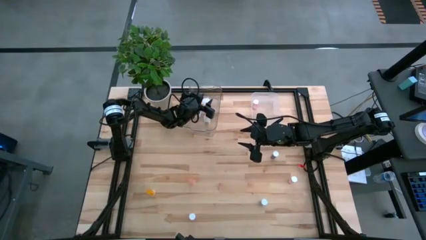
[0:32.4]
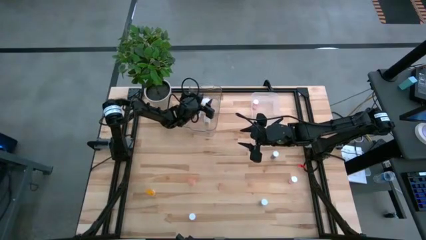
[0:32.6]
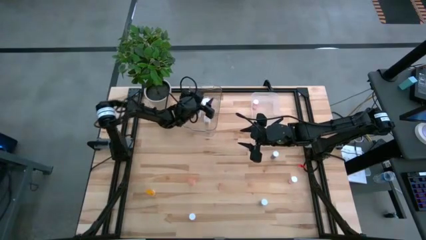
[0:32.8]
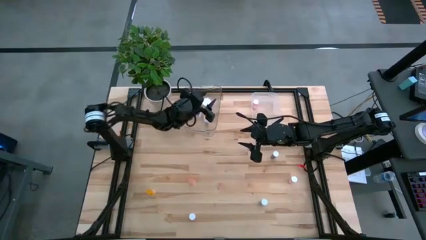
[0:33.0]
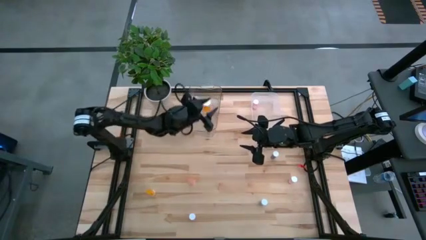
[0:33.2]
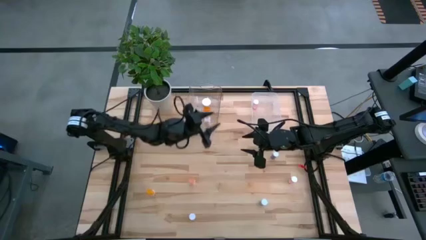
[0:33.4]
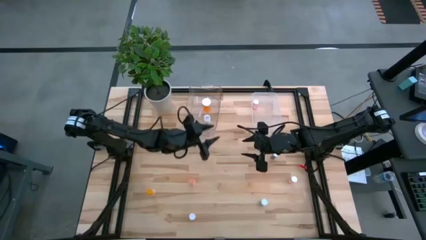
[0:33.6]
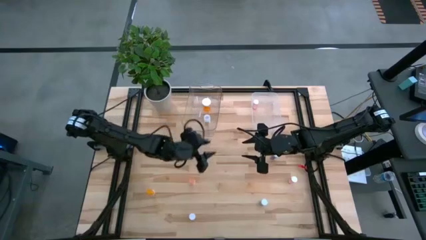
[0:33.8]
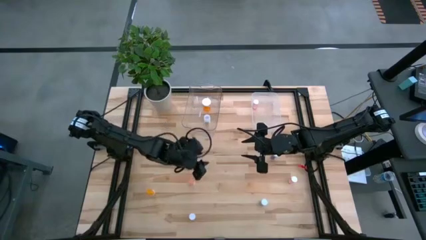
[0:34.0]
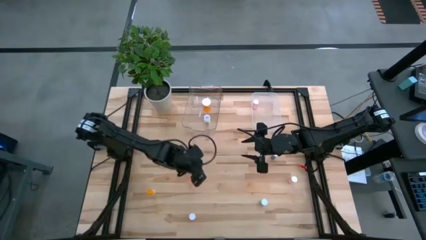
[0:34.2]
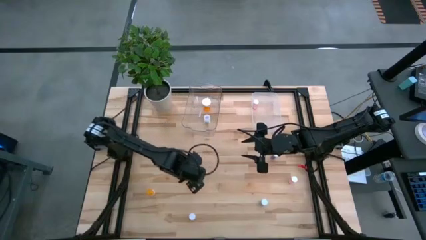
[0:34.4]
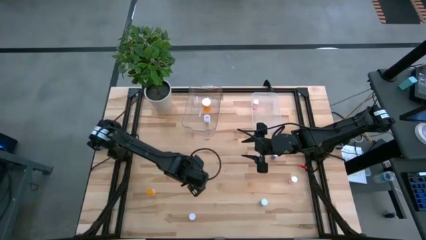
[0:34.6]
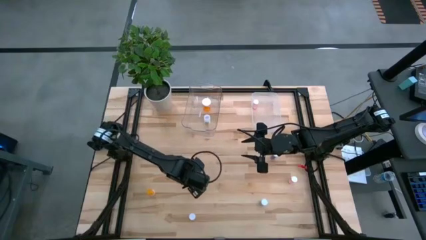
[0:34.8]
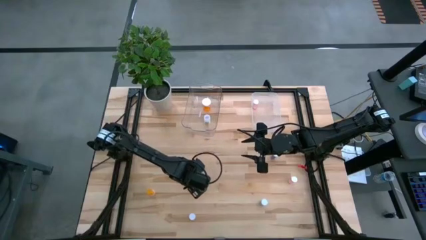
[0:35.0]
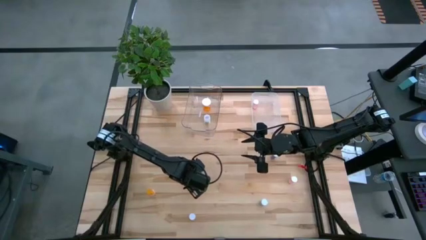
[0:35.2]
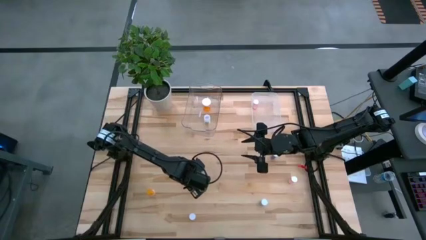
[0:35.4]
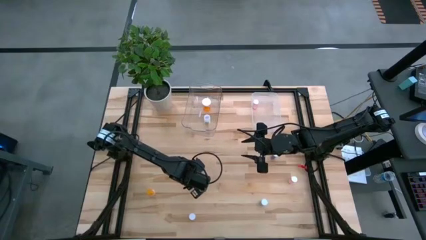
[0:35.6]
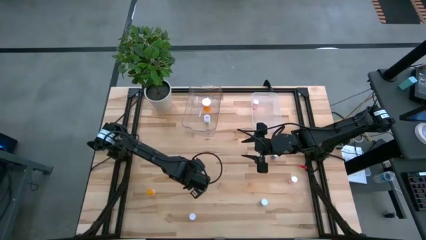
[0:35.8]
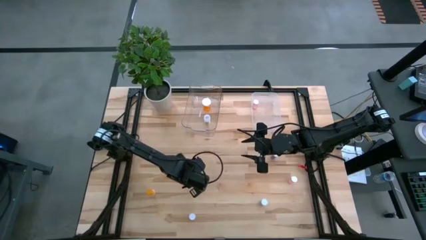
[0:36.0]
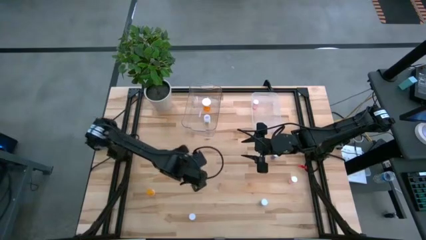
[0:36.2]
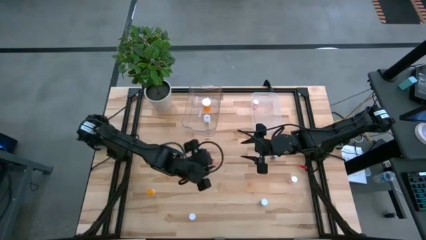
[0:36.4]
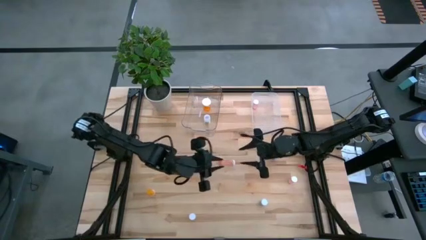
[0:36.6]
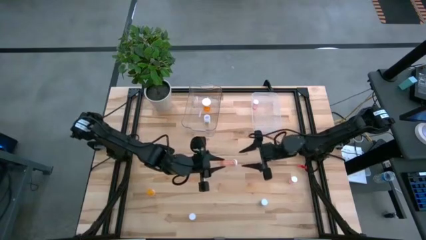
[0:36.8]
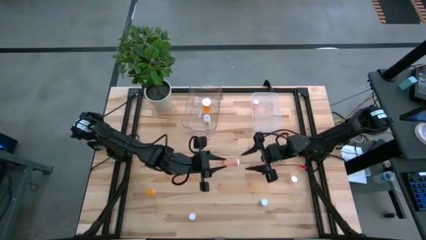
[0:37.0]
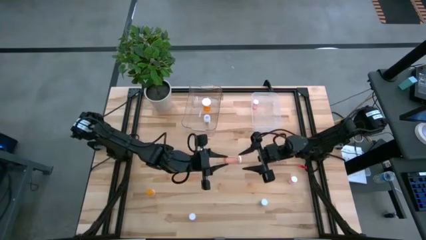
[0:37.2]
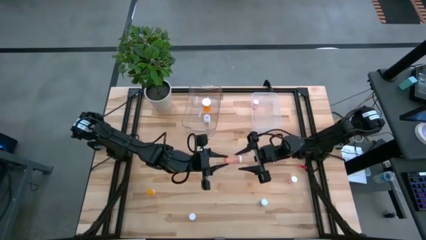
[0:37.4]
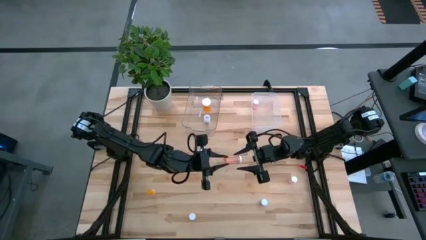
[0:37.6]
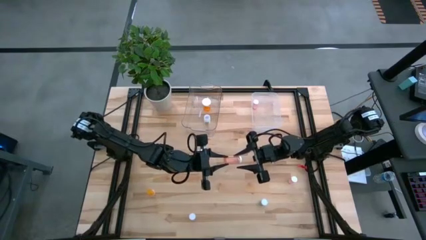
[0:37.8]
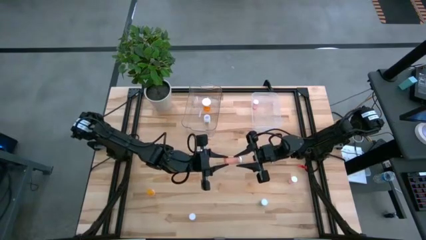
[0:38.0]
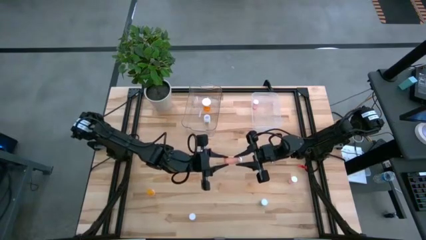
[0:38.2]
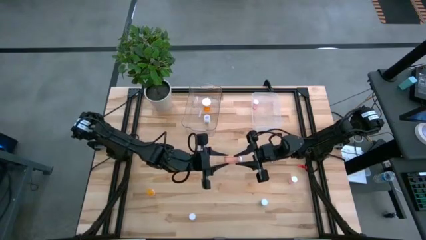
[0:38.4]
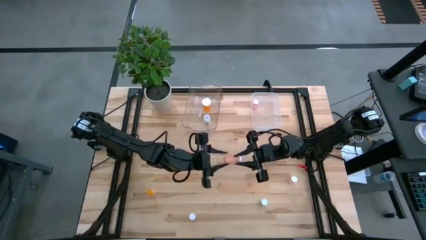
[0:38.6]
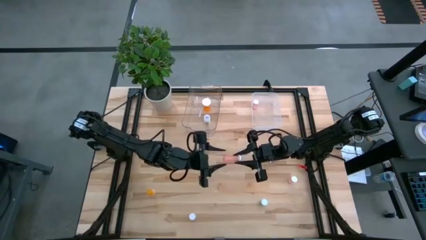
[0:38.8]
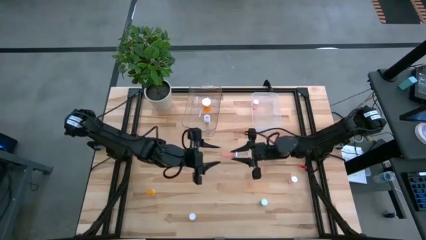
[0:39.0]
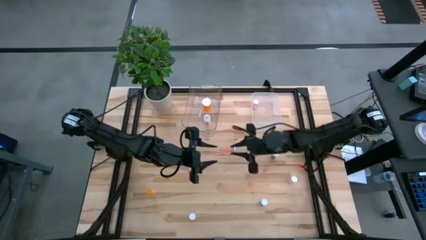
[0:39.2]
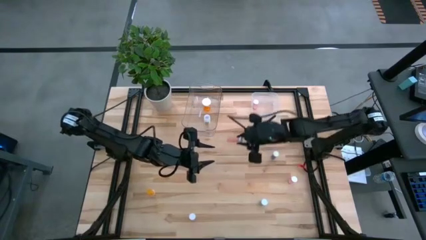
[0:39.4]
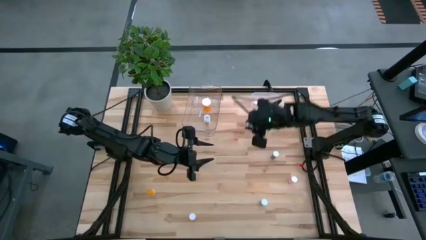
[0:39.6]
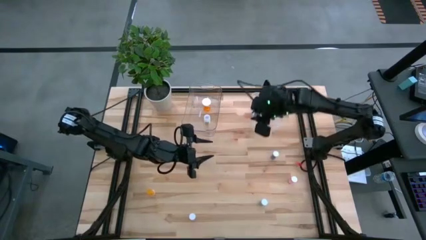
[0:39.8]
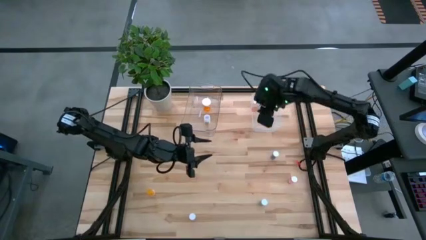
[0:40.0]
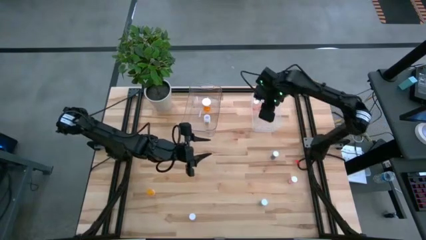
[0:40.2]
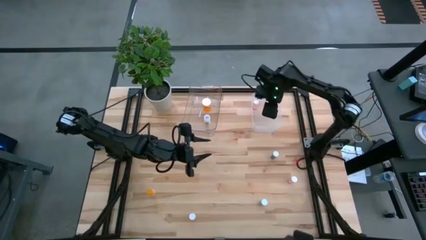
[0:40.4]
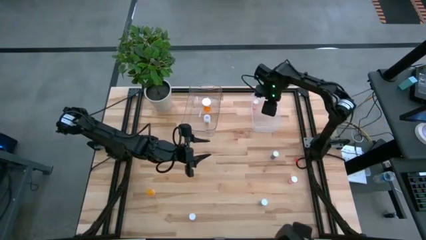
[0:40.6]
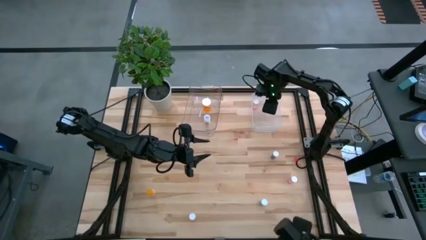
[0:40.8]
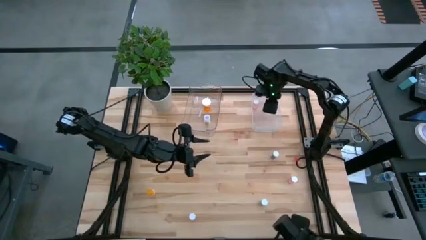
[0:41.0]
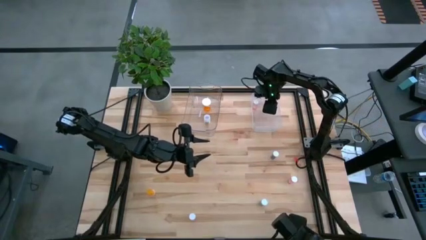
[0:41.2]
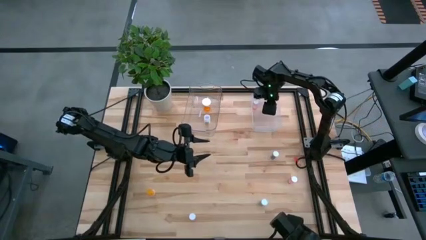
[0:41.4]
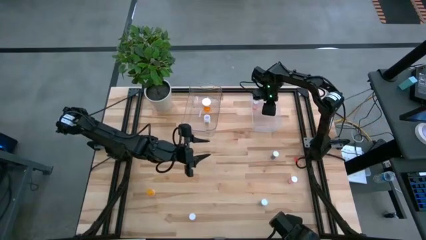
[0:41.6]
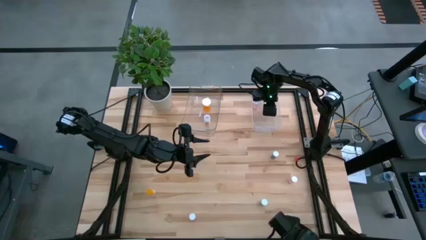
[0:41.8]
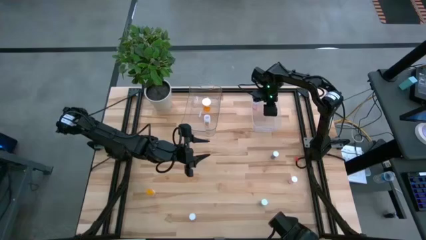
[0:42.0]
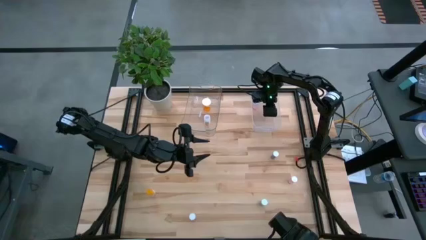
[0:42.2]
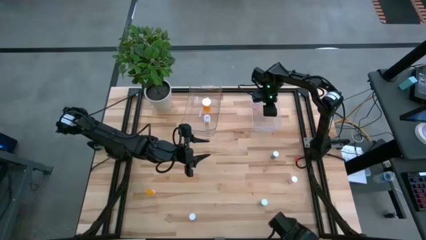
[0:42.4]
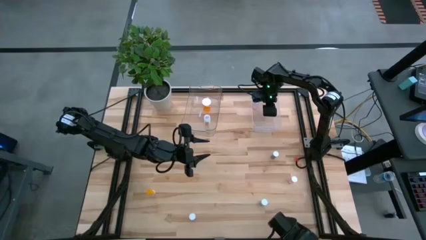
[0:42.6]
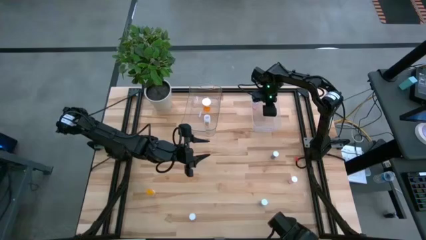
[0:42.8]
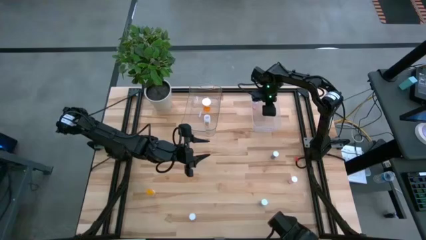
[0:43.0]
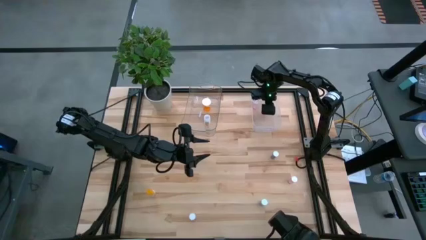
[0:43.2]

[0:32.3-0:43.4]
Task: Pick and place medicine bottles into bin by pill shape (circle, oval)
Put the pink tablet pill bottle into the right transparent bin

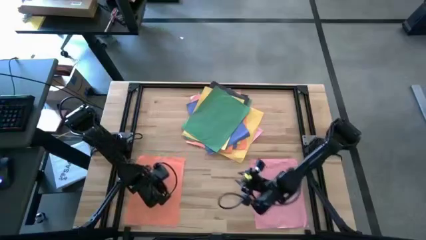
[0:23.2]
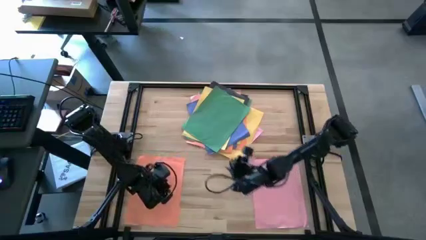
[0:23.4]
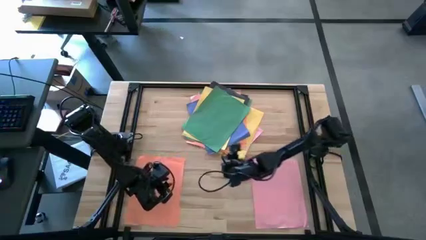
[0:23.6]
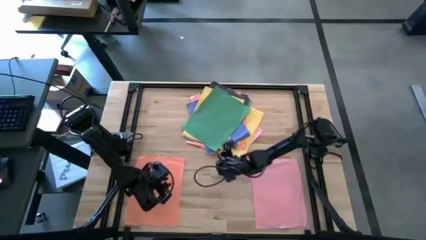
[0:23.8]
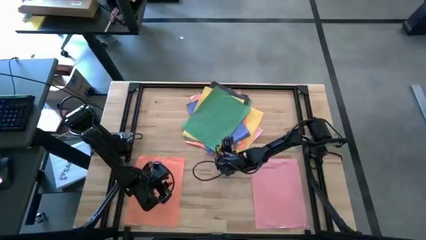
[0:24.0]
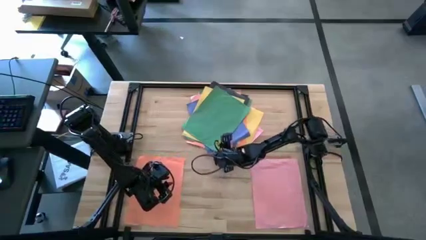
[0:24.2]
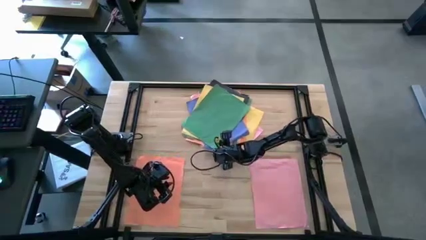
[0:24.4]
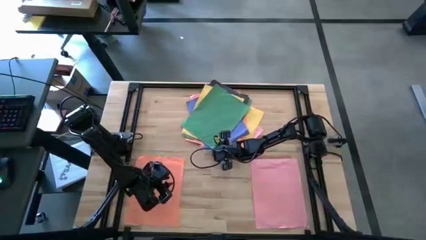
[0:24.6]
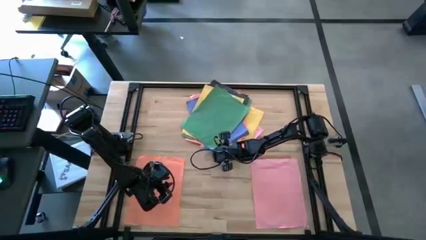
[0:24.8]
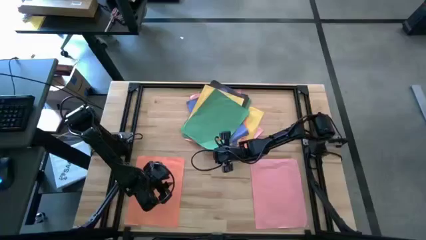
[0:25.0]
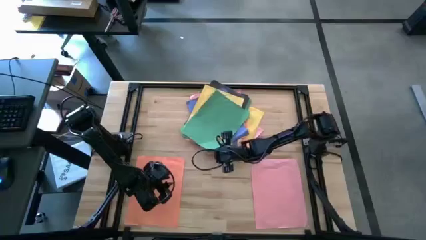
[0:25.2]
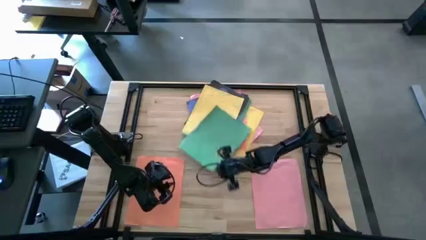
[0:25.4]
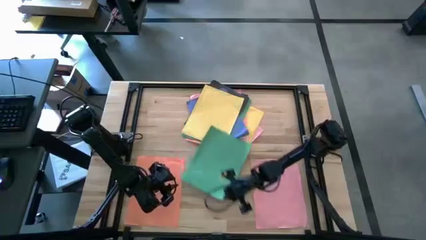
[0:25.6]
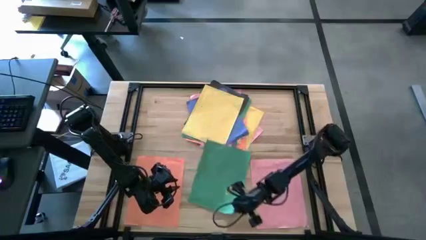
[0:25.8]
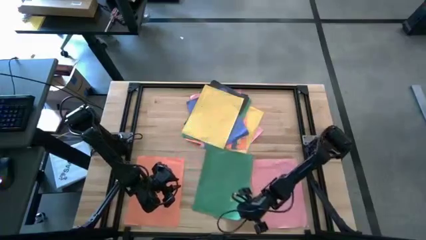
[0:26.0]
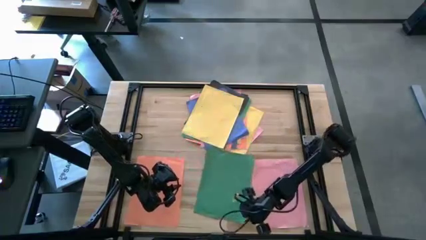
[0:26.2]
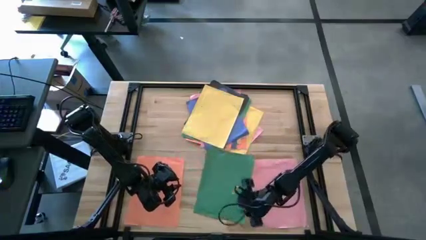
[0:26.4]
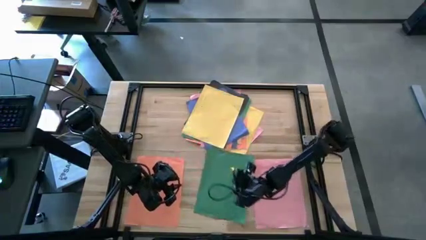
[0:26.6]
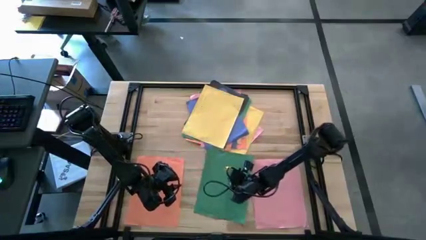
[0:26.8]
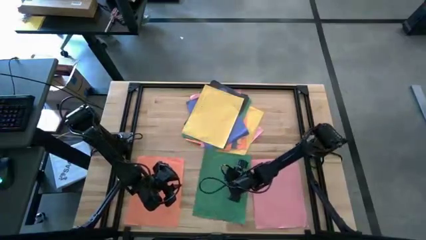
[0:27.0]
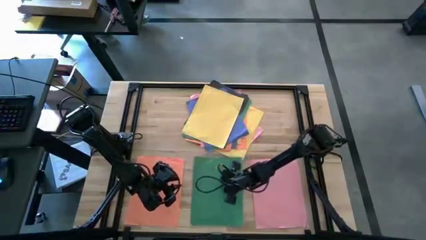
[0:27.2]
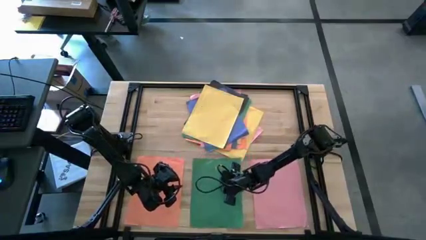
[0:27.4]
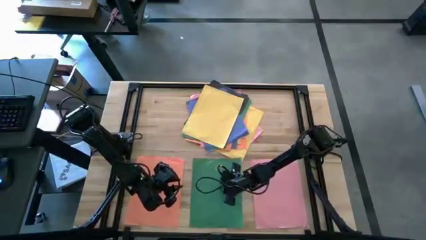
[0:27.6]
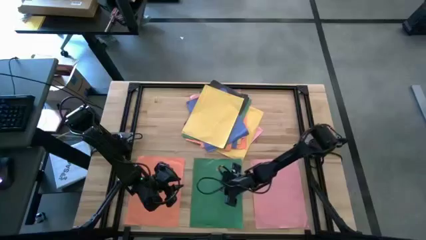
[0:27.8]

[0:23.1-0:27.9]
Task: Organize paper
Move the green paper to the lower middle of the table
